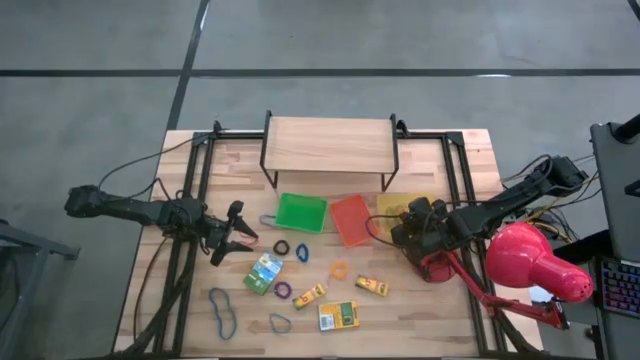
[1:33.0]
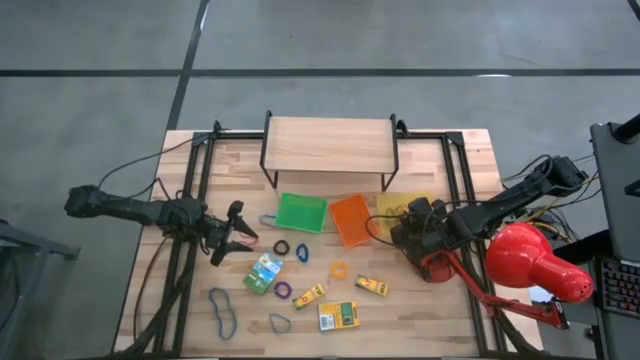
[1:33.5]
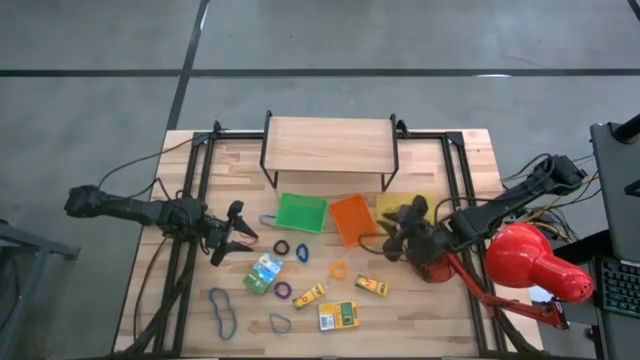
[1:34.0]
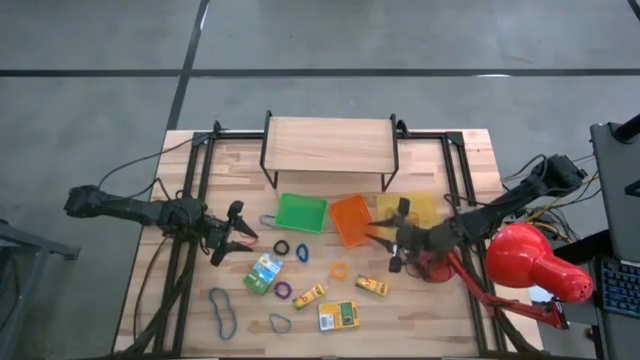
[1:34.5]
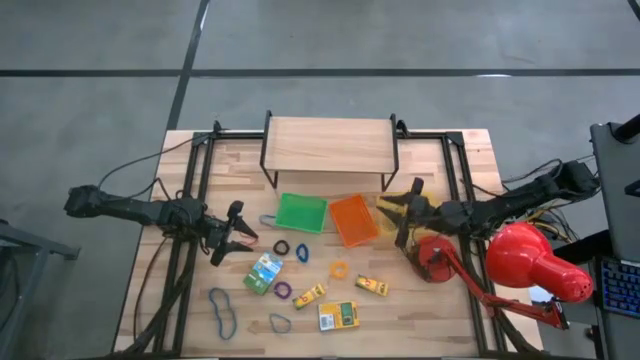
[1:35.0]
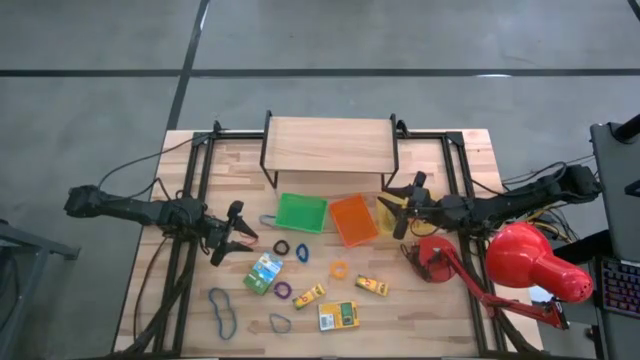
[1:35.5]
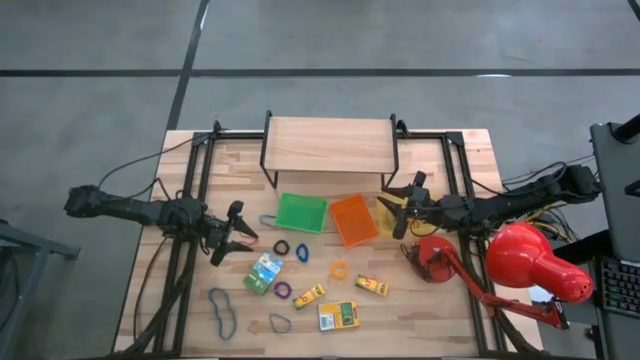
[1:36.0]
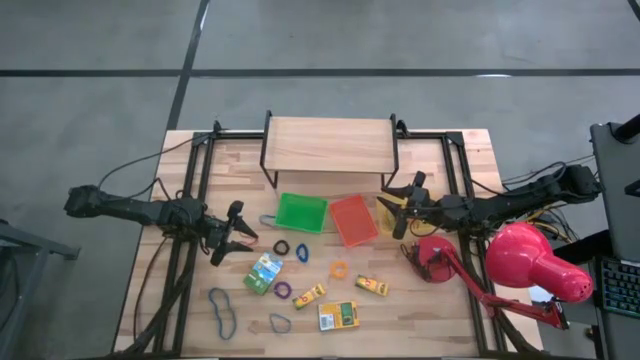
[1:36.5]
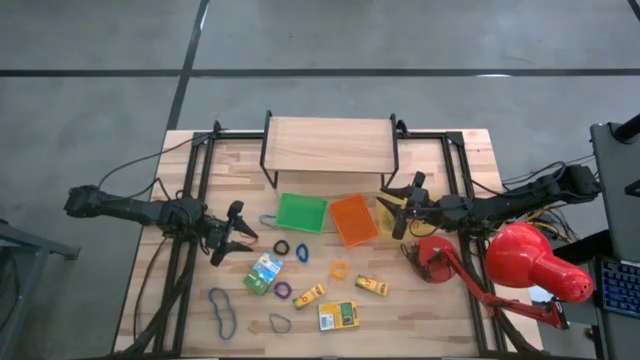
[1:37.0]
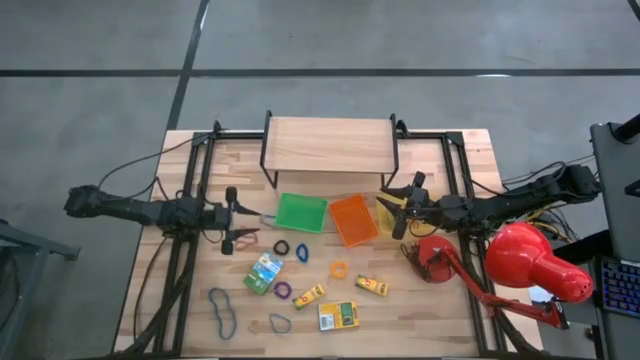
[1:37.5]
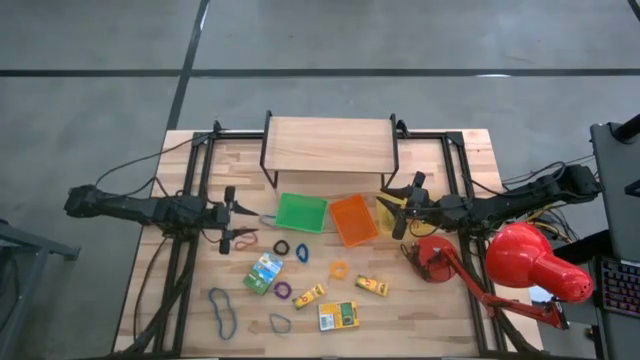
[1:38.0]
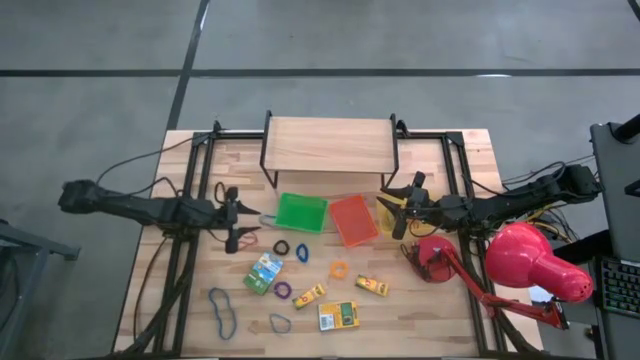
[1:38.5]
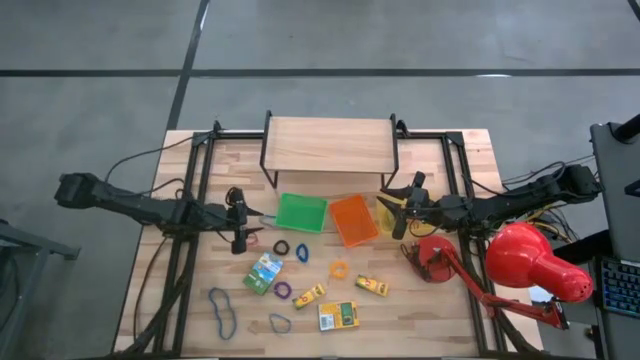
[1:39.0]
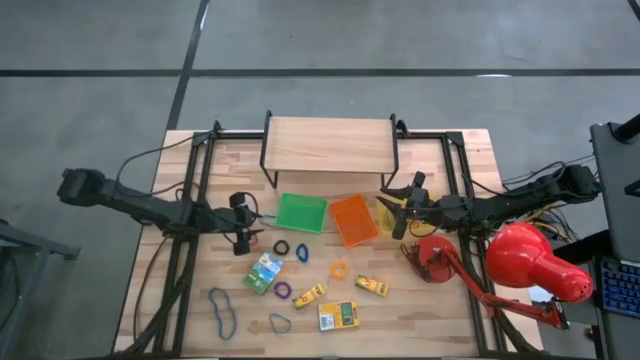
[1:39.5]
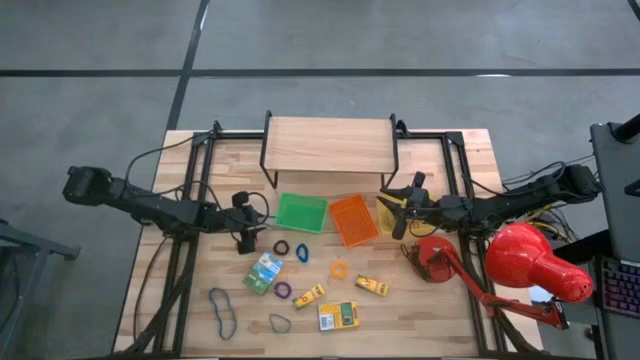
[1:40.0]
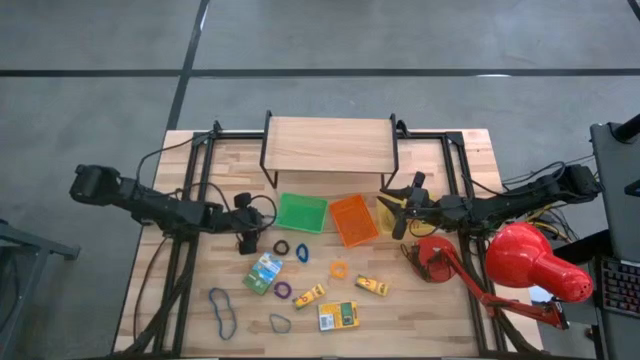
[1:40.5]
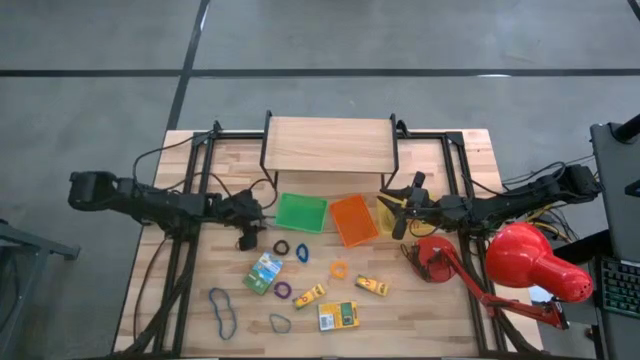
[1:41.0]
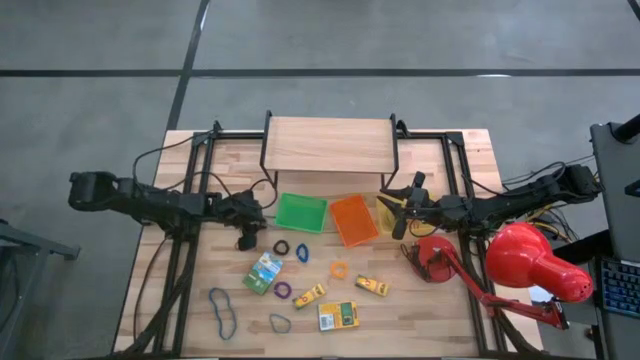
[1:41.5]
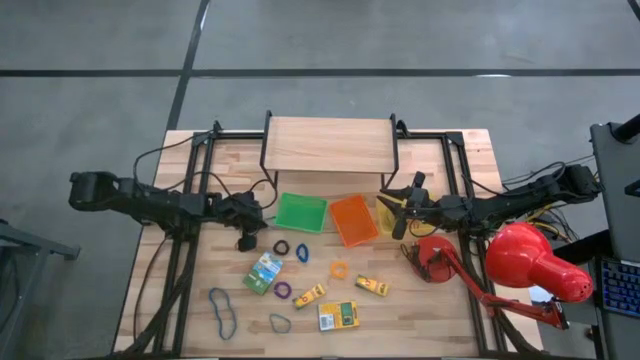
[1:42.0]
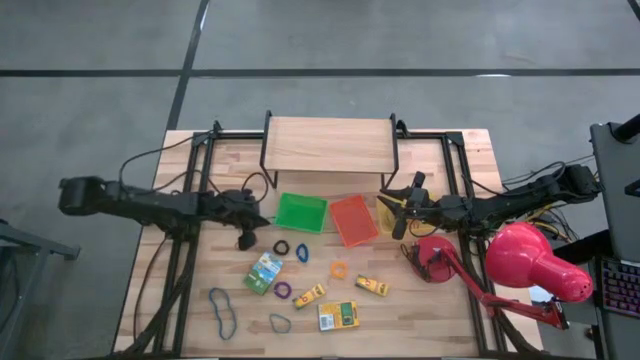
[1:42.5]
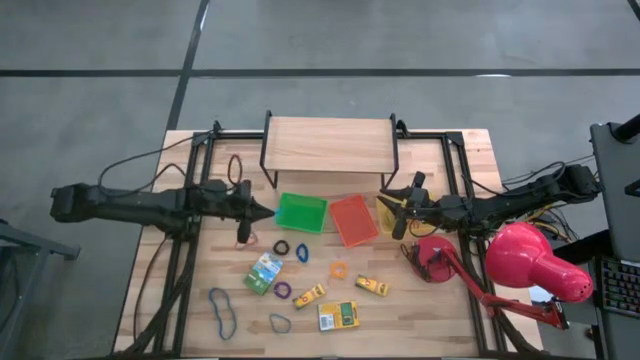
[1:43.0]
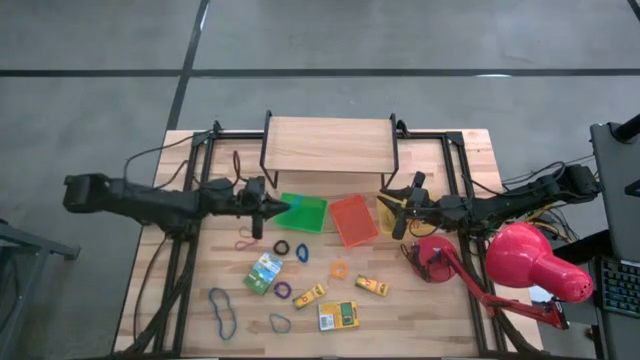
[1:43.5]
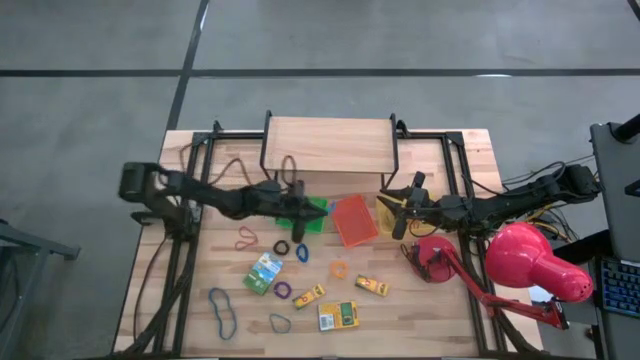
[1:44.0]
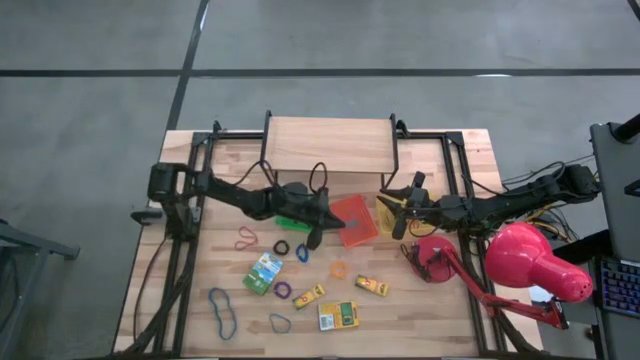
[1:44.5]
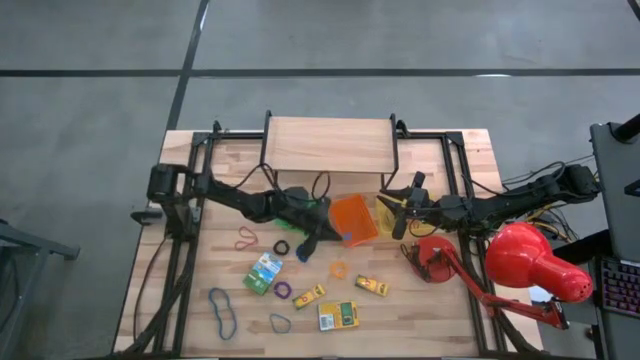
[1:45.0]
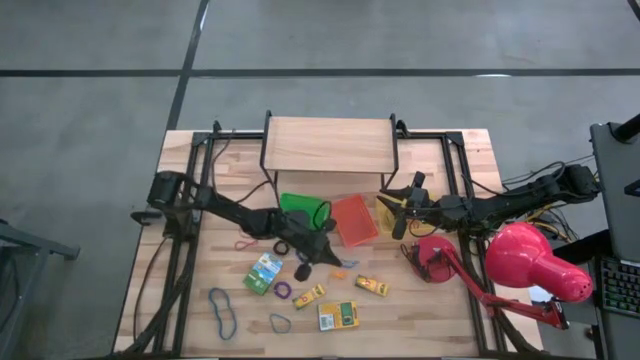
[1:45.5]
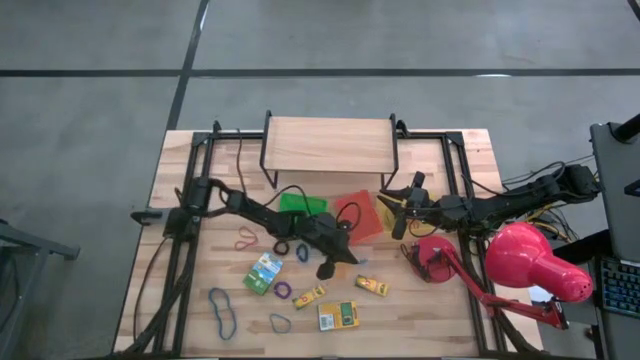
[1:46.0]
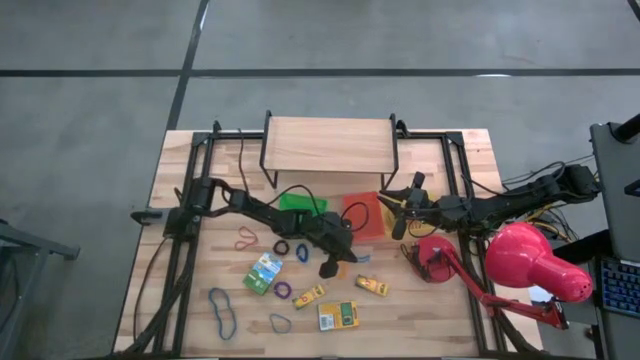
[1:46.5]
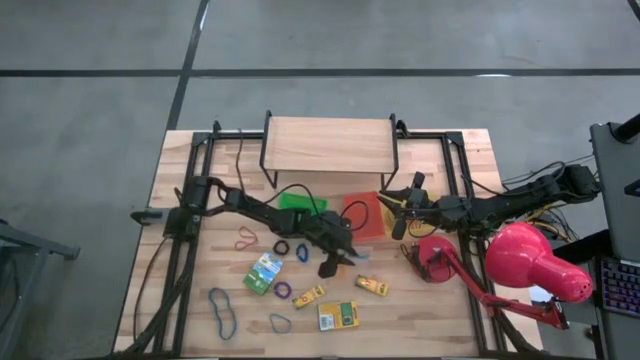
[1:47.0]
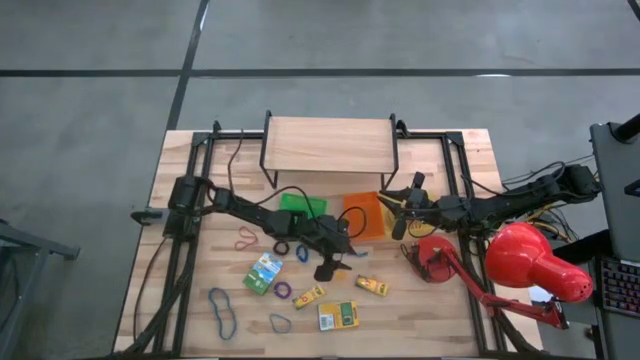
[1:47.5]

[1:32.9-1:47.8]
Task: Pick & Place Office Desk Supplies
Put the top blue rubber band into the yellow bin

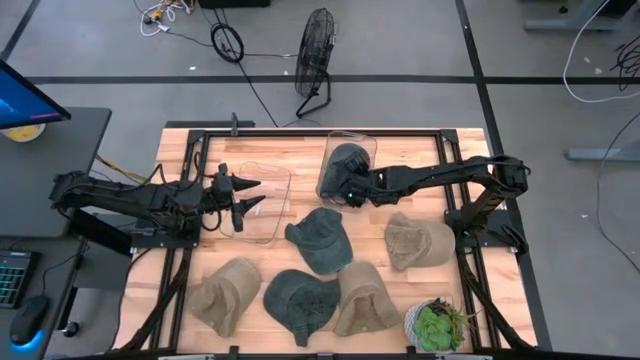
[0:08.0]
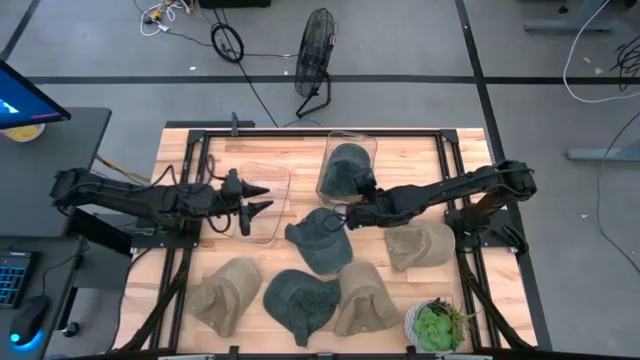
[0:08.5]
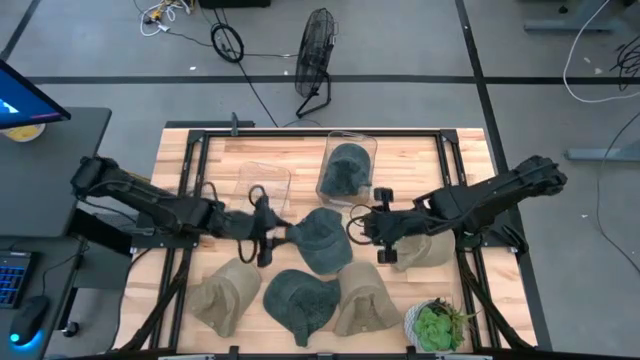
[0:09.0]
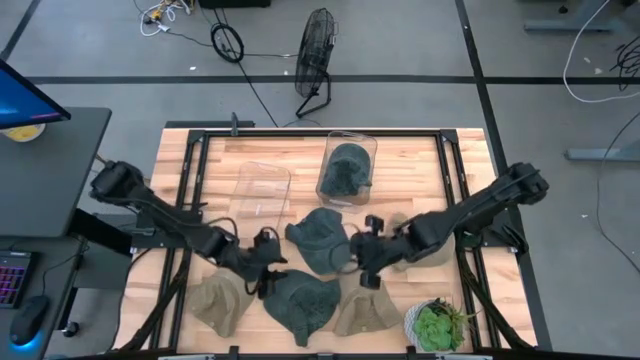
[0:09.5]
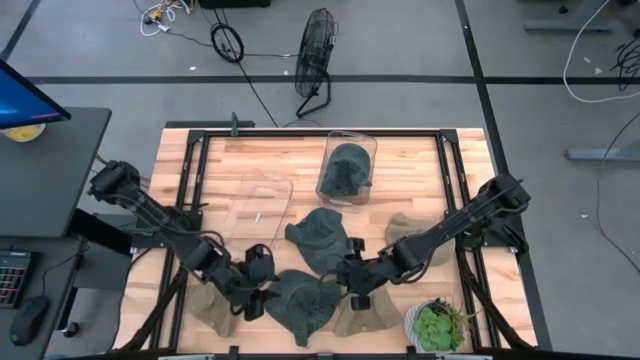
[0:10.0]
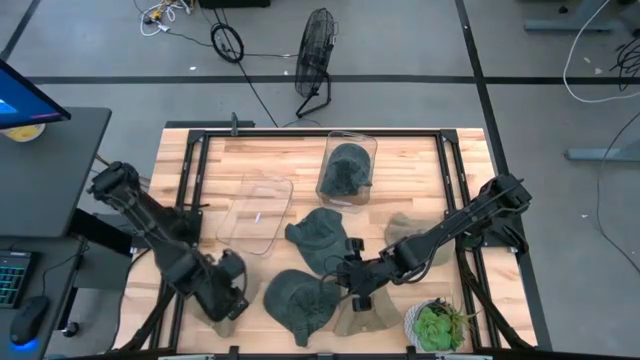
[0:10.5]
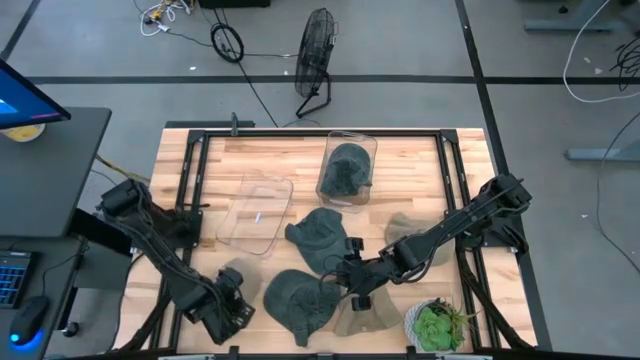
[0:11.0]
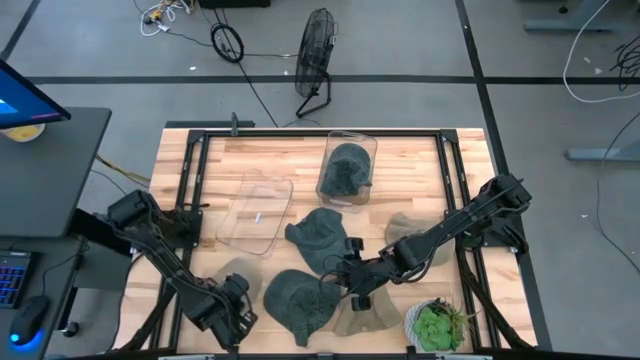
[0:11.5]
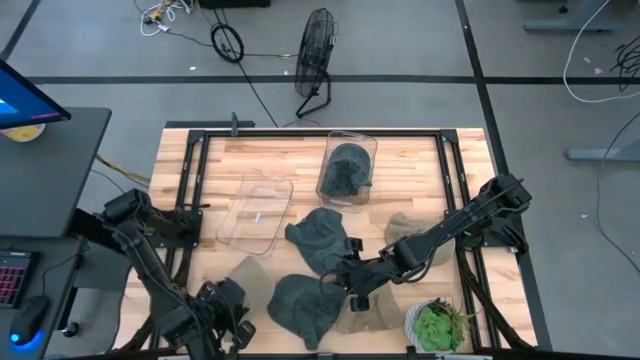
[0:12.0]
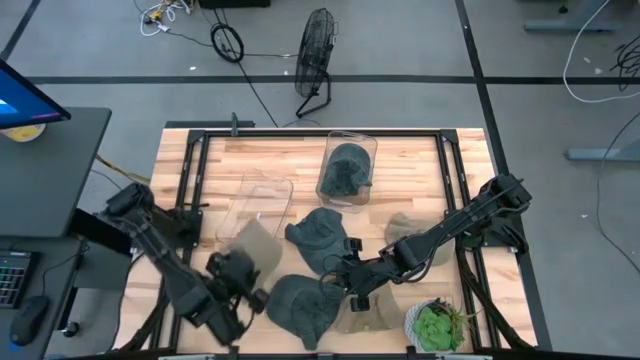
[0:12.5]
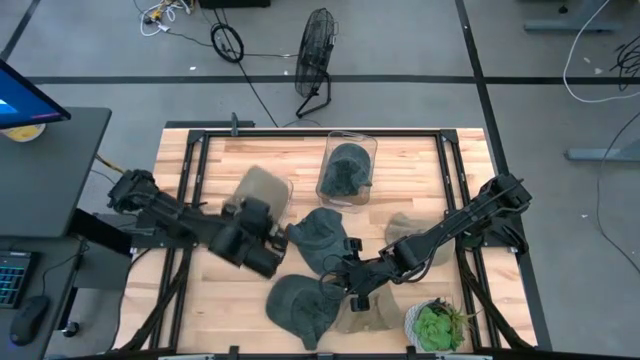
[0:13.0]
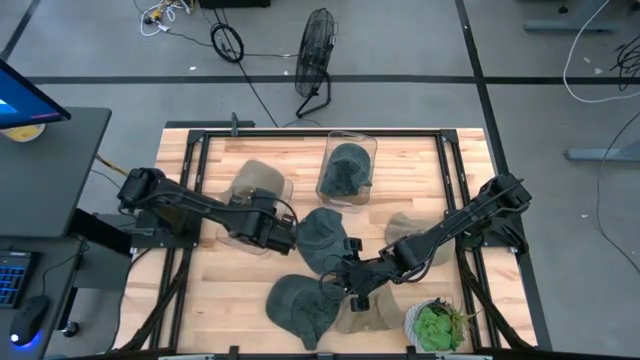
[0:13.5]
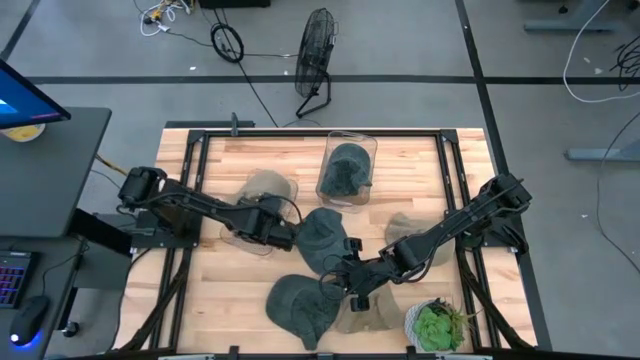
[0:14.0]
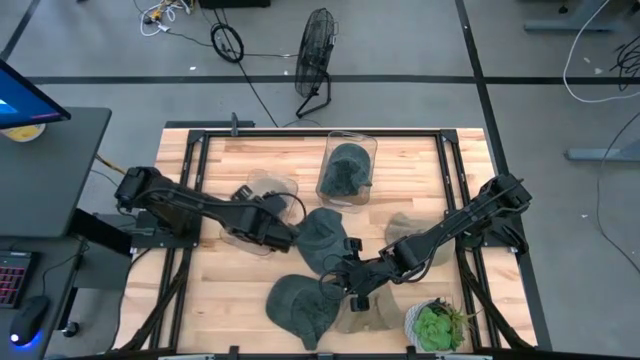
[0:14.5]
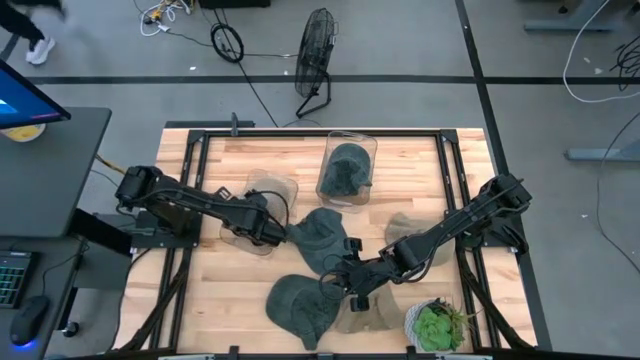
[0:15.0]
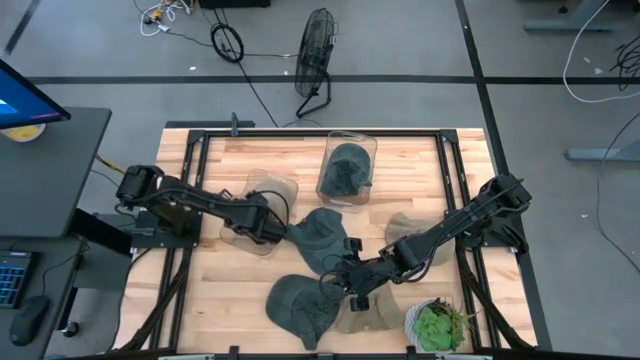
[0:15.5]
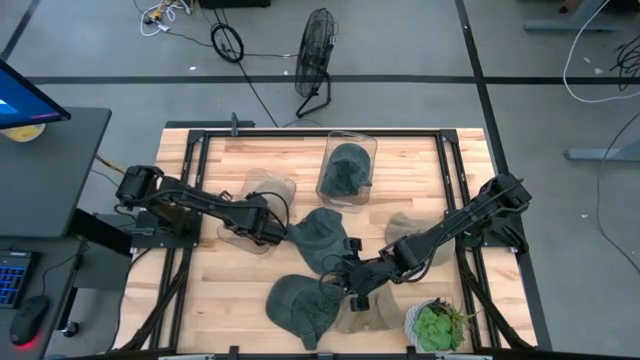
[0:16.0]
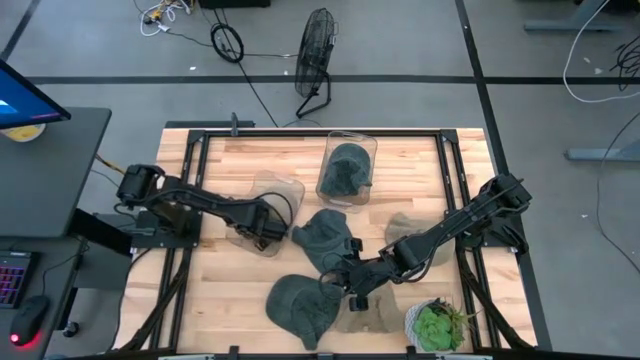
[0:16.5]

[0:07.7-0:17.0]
Task: Pick & Place hat
Put the left brown cap into the left transparent bin
